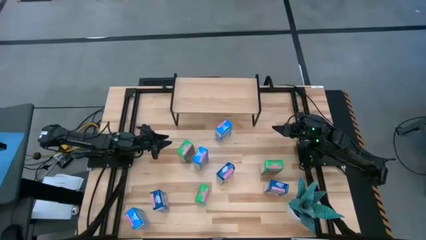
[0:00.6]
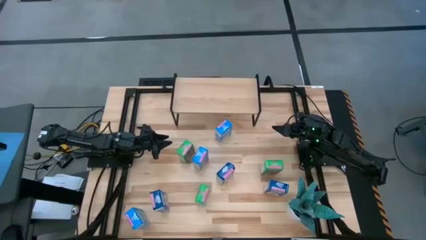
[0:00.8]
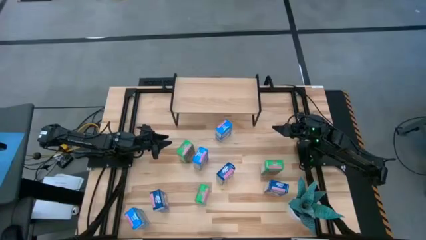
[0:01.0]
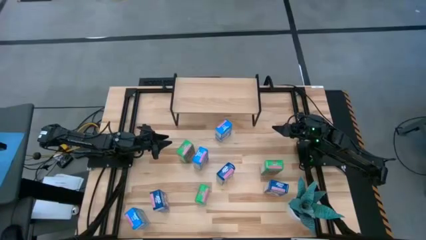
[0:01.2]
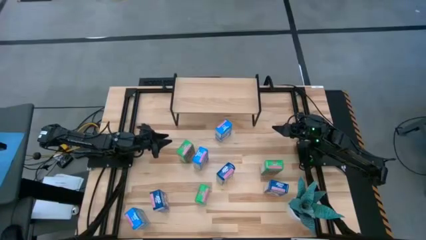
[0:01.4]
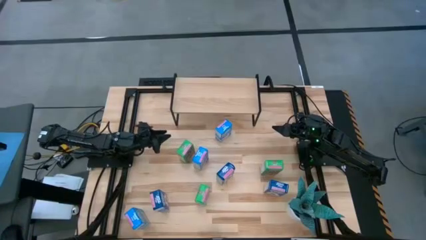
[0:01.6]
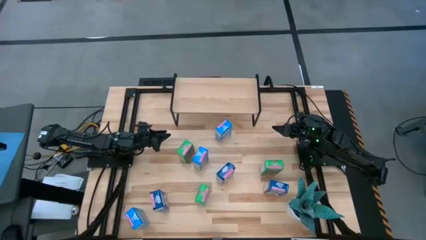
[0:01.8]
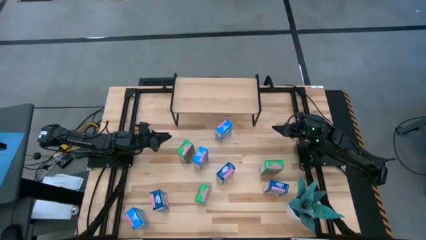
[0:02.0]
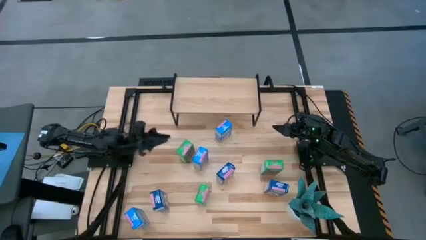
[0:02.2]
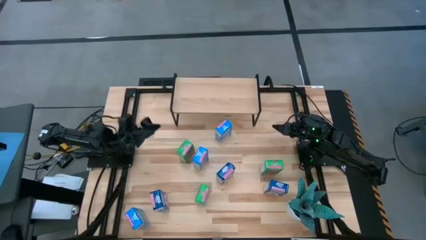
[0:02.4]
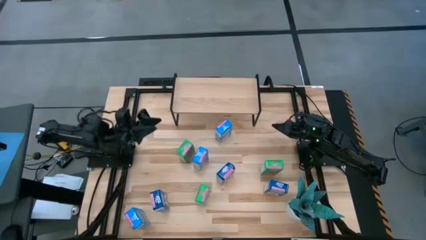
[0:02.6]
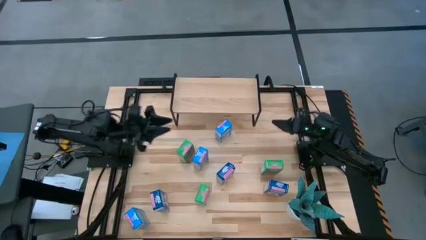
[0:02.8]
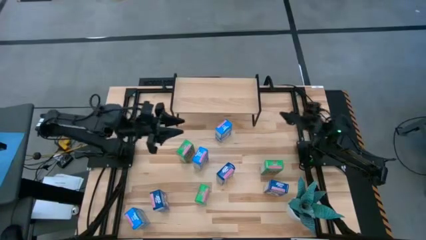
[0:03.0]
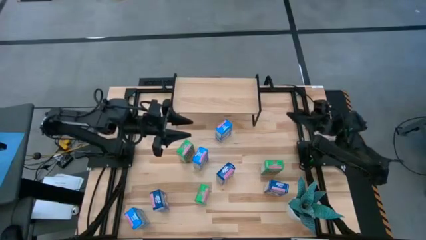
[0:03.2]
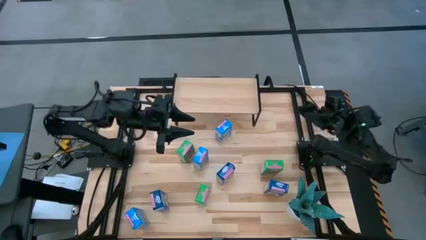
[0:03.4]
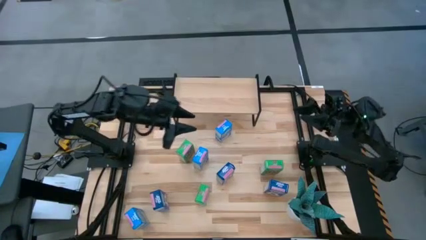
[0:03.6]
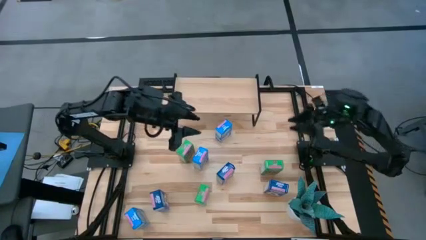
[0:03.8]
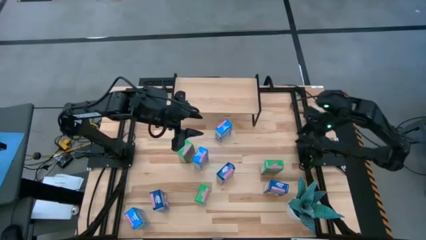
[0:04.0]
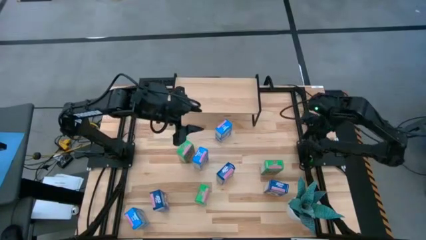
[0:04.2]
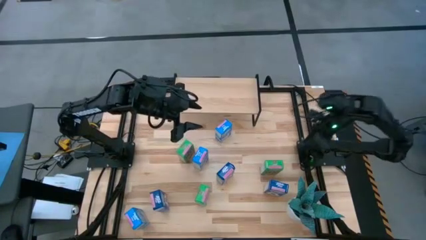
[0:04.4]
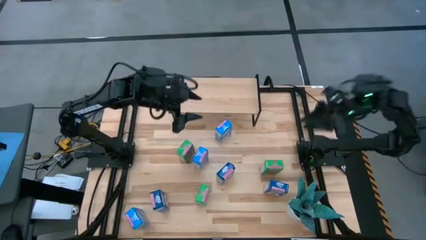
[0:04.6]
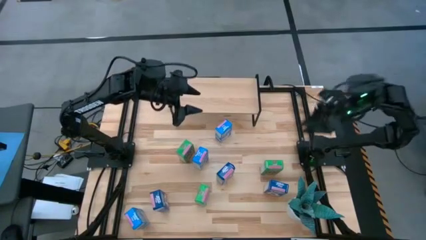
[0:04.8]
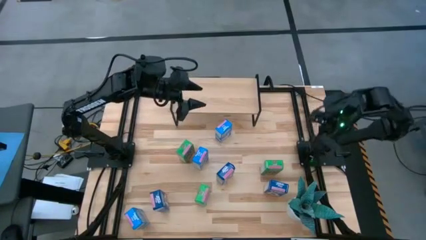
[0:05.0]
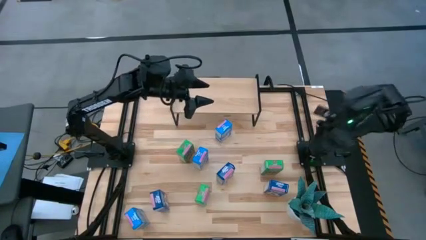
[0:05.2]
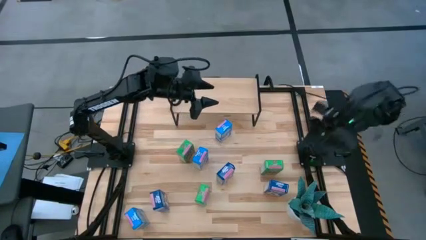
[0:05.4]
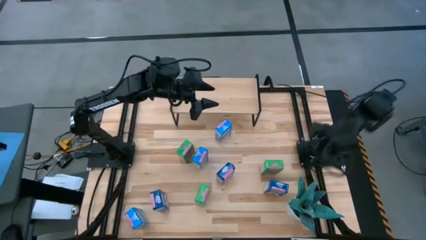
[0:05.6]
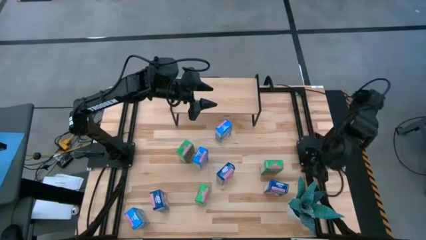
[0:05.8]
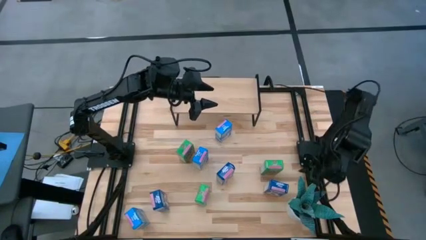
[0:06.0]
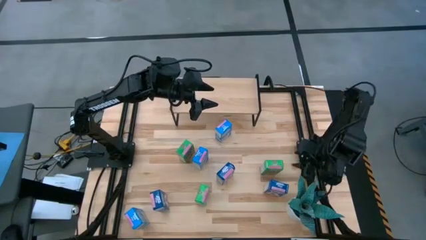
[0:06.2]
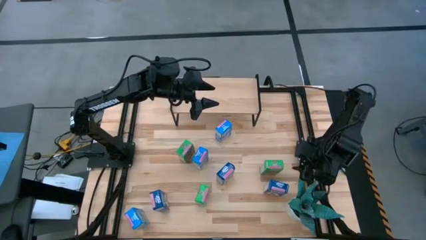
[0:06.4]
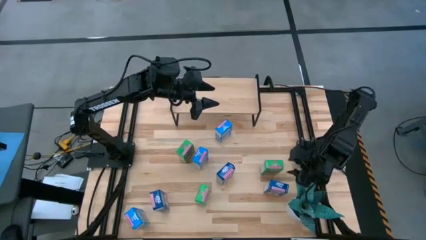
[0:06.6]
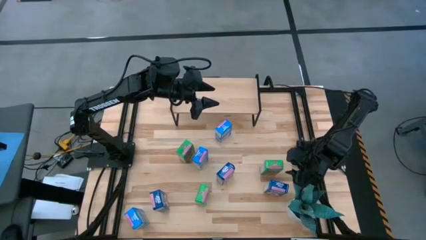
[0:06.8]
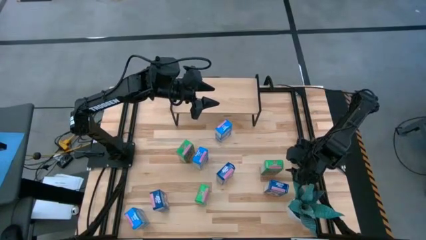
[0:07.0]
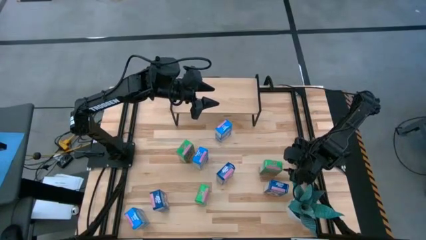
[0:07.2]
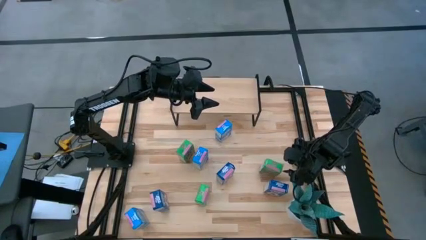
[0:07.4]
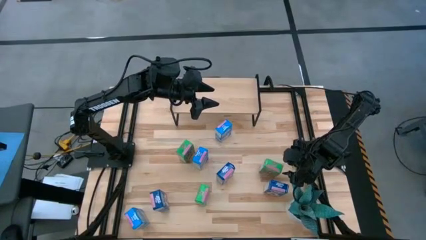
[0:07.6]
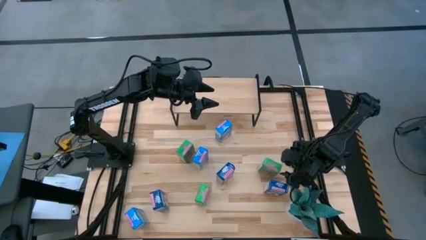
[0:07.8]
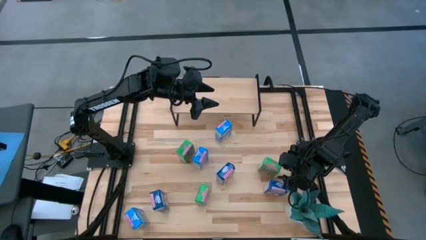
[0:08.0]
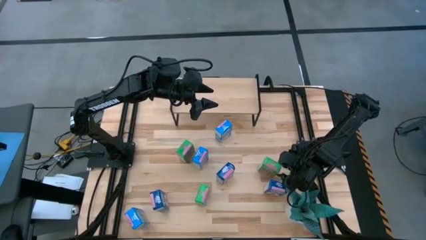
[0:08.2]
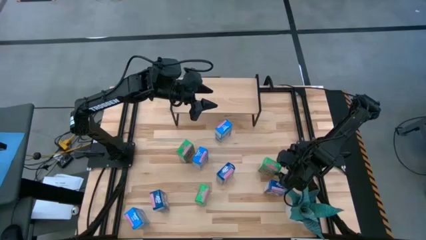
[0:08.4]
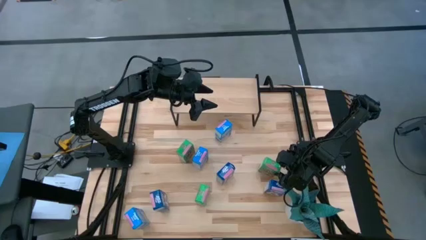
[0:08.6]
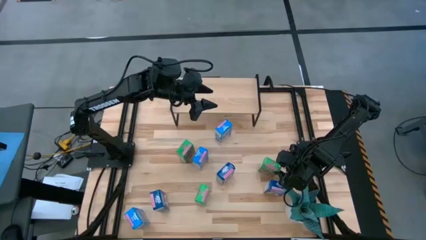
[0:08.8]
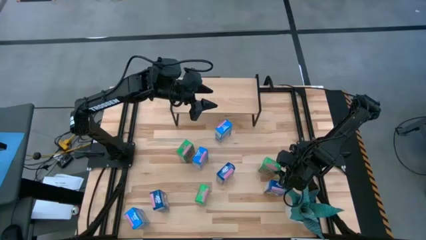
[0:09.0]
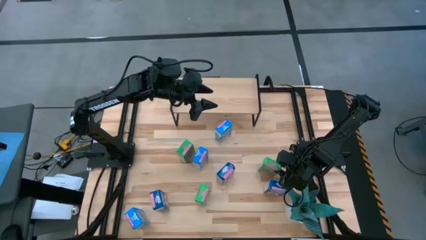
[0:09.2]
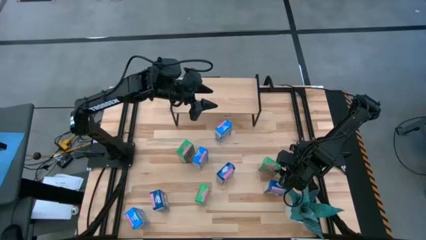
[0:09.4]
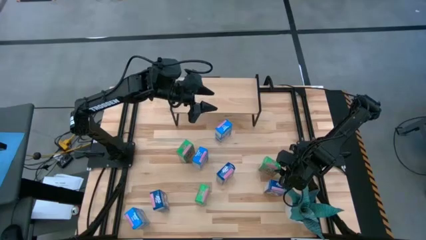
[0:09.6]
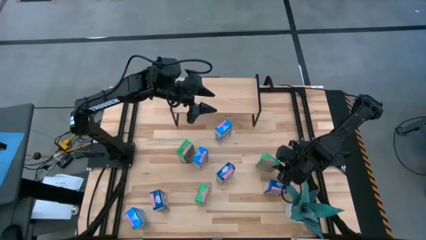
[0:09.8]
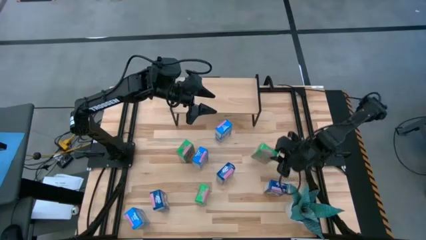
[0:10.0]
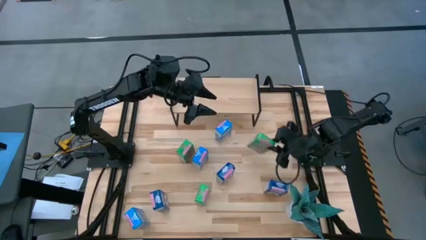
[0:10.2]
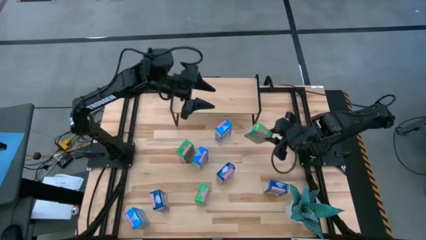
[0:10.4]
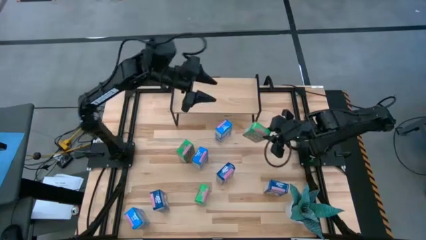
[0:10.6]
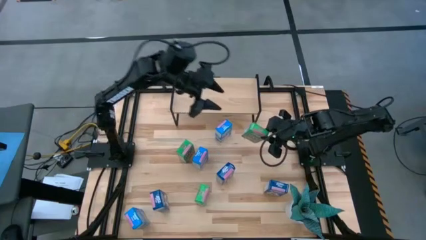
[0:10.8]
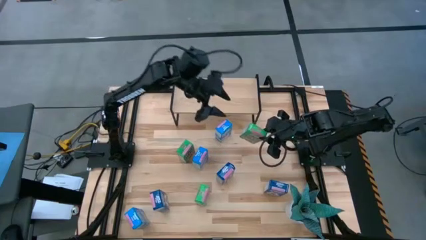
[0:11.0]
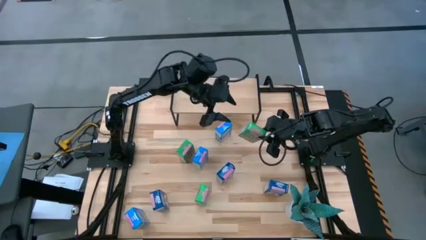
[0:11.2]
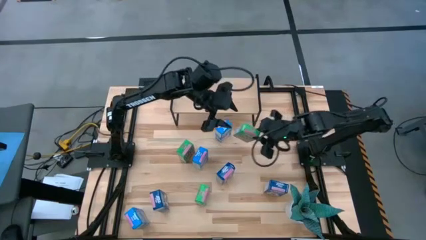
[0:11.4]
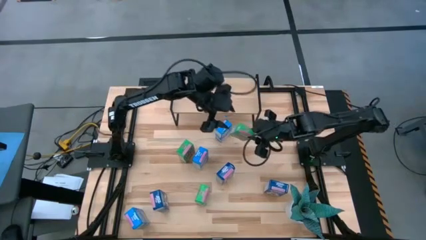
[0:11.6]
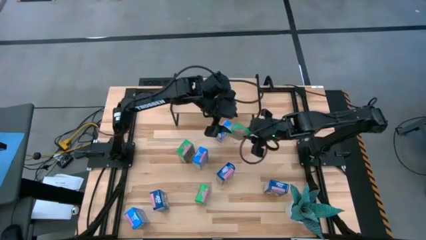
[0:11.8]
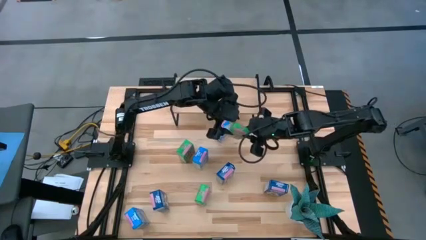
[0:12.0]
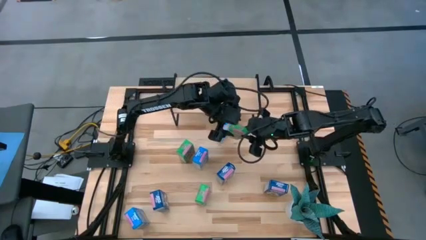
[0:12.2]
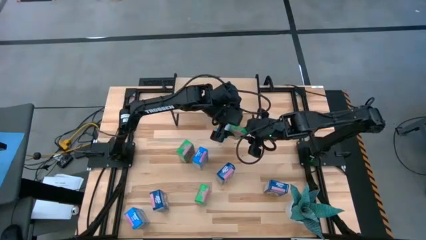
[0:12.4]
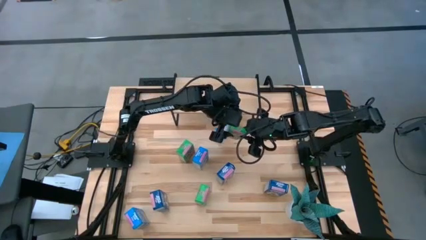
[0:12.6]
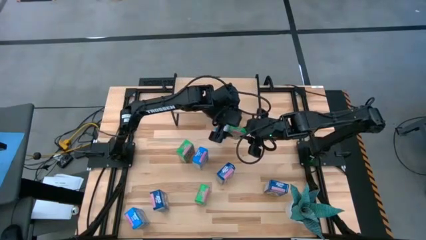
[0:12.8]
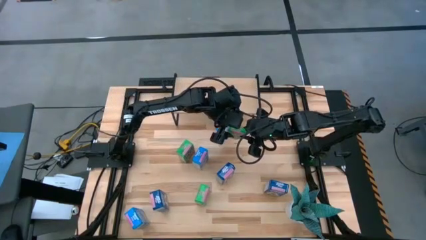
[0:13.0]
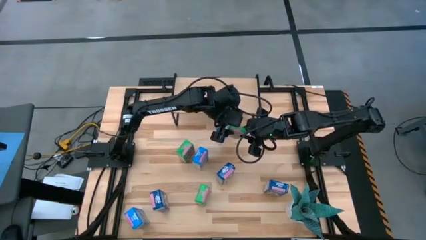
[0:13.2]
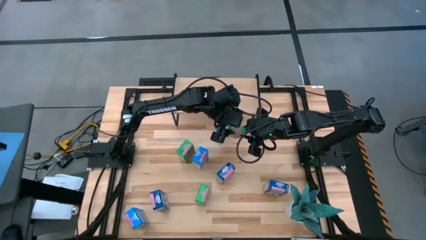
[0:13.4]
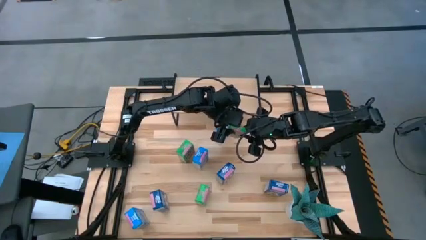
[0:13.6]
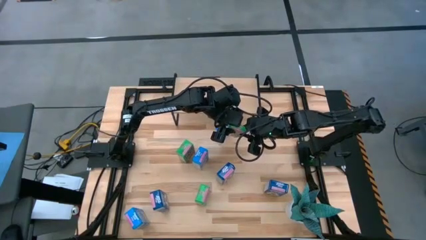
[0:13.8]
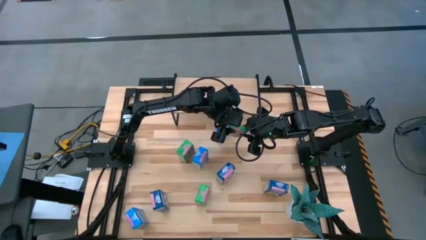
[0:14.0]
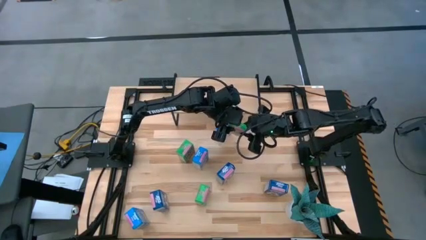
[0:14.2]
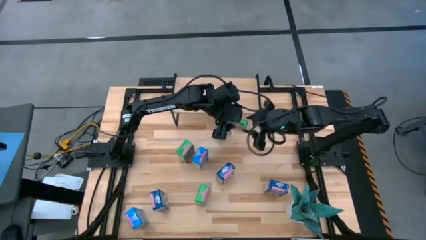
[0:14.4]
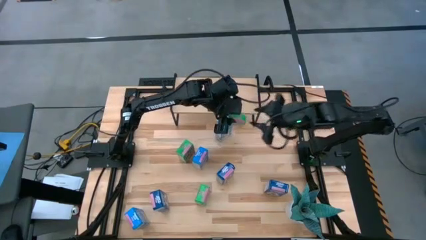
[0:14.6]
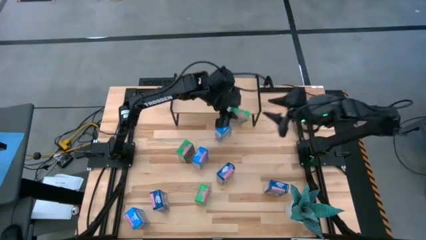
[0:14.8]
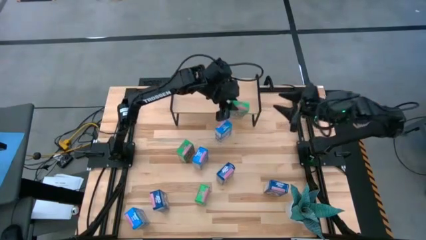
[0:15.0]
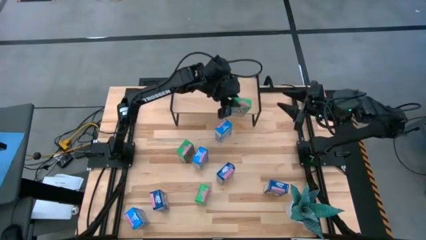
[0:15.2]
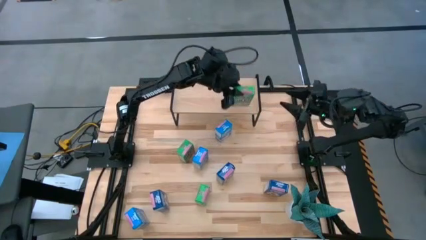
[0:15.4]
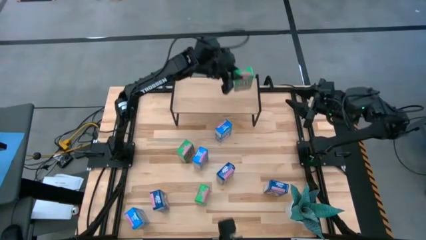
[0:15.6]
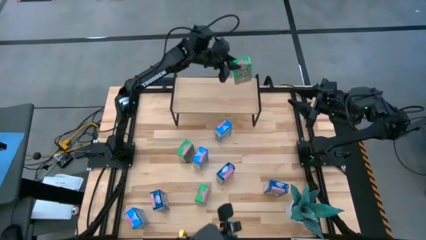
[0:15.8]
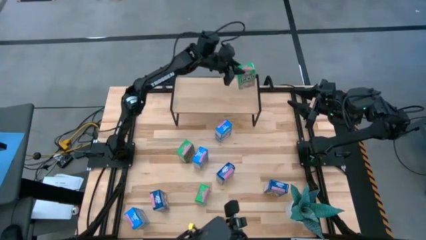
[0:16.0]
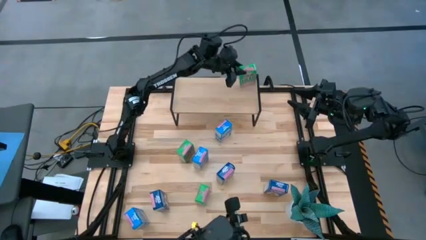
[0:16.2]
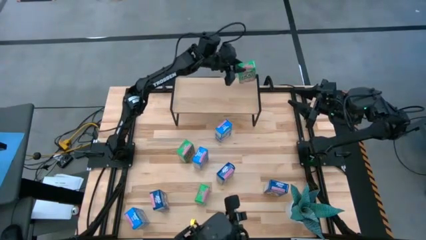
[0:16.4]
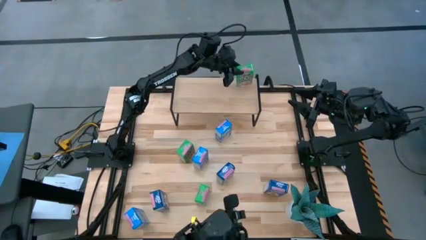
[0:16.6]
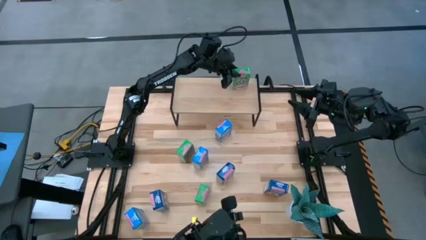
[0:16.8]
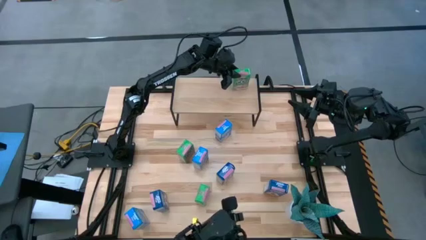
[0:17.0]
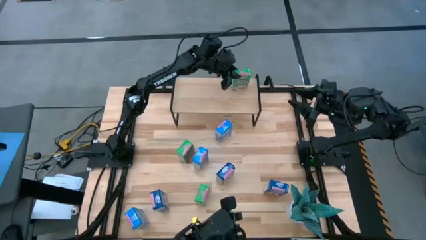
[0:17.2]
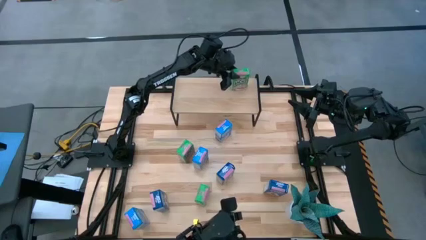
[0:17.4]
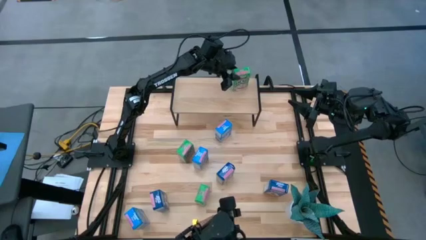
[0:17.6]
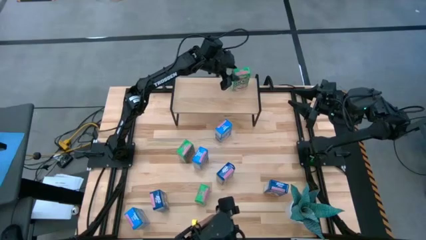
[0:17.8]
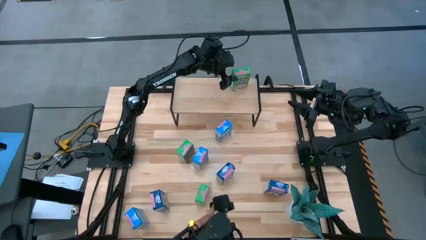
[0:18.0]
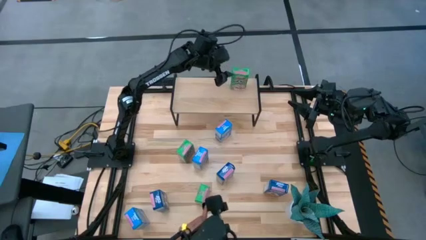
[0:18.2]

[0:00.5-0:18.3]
Task: Stack cereal on shelf
Put the right green cereal box on the shelf
